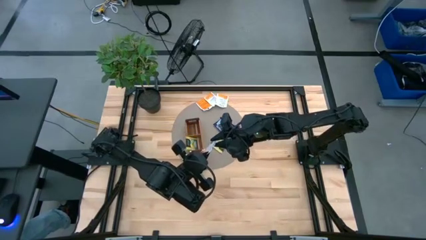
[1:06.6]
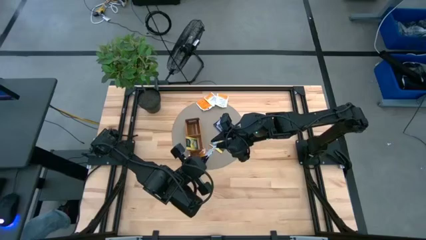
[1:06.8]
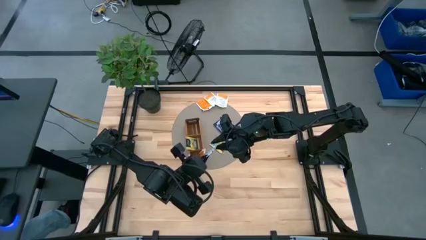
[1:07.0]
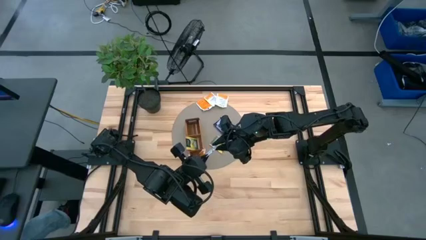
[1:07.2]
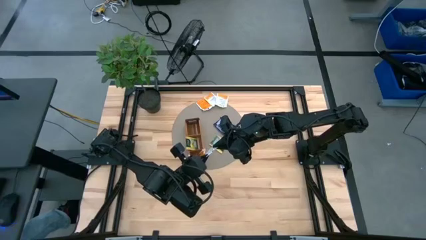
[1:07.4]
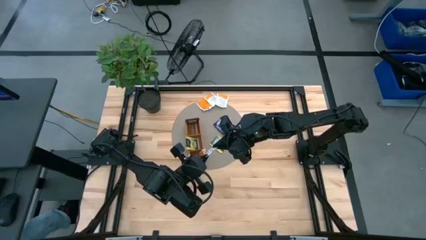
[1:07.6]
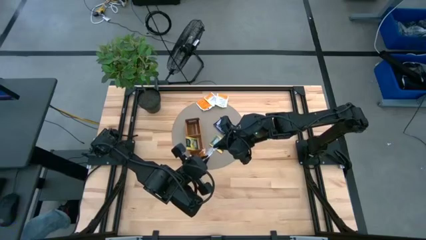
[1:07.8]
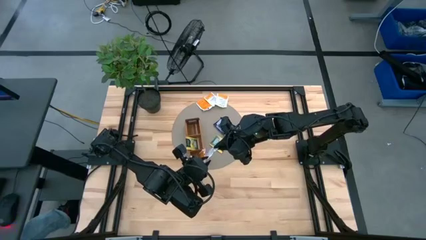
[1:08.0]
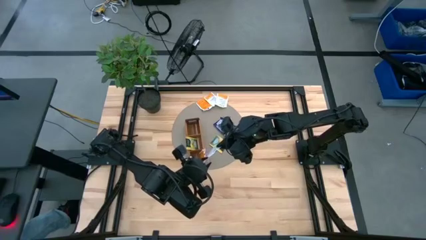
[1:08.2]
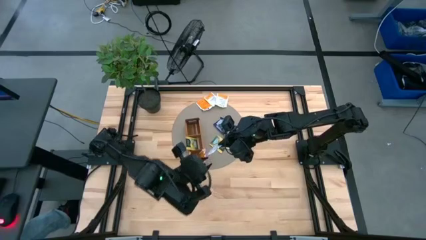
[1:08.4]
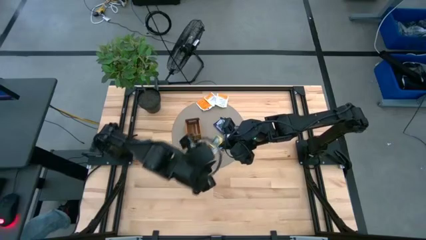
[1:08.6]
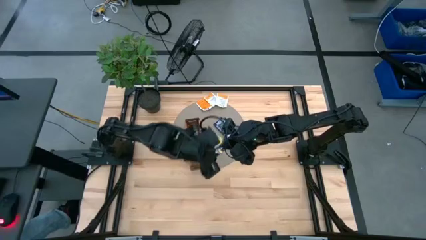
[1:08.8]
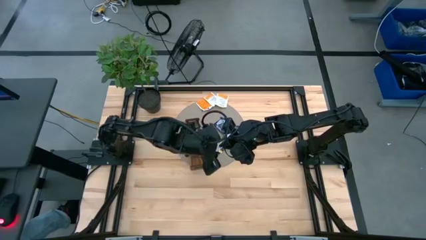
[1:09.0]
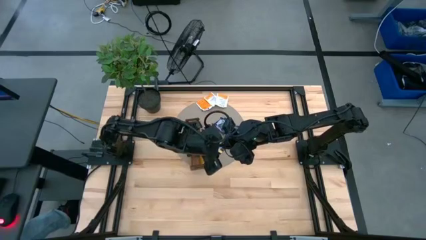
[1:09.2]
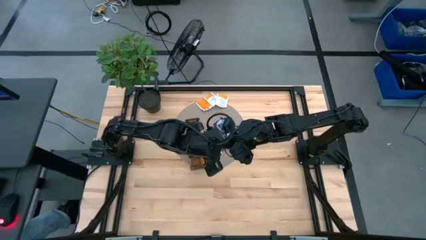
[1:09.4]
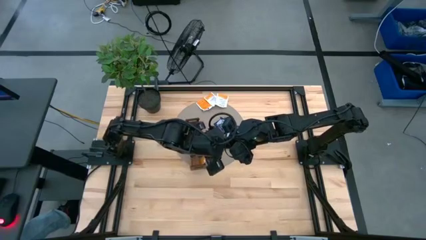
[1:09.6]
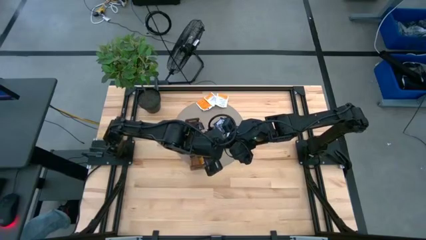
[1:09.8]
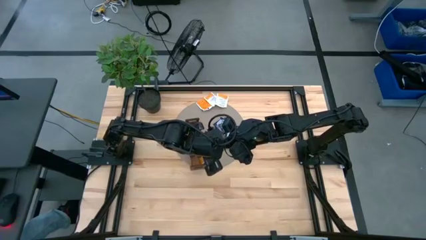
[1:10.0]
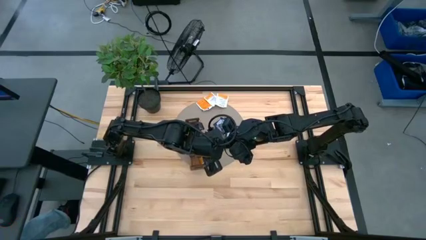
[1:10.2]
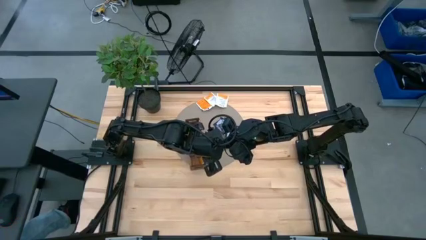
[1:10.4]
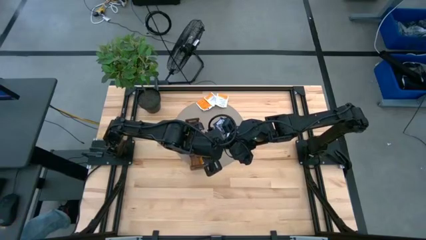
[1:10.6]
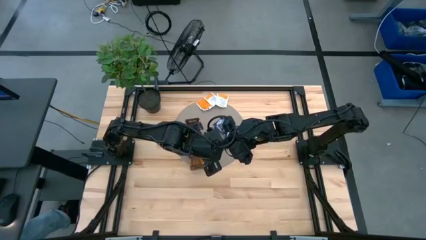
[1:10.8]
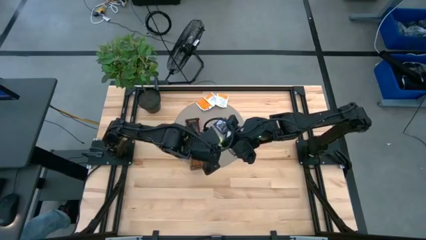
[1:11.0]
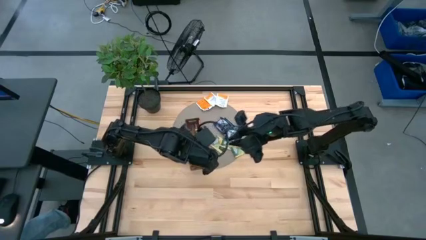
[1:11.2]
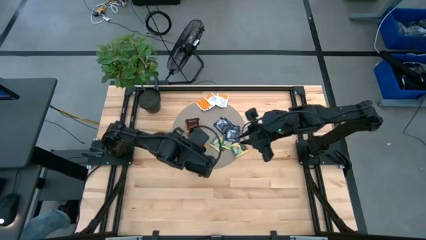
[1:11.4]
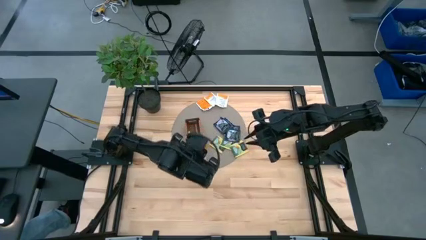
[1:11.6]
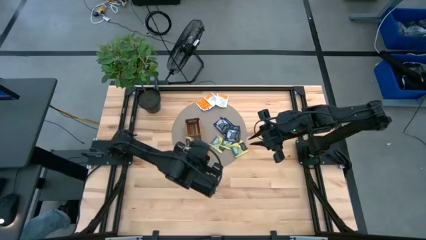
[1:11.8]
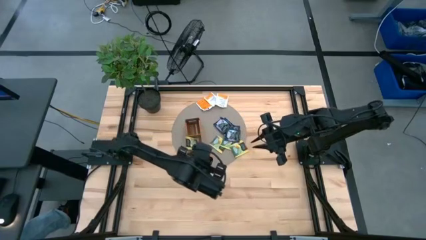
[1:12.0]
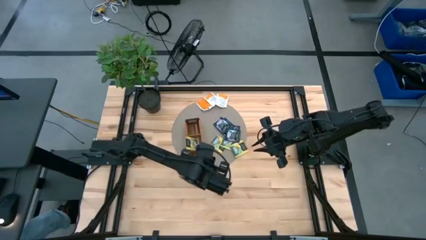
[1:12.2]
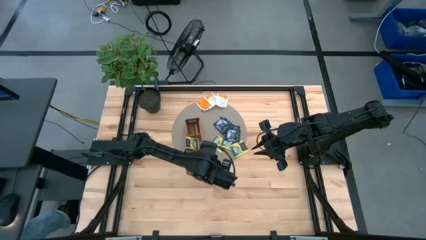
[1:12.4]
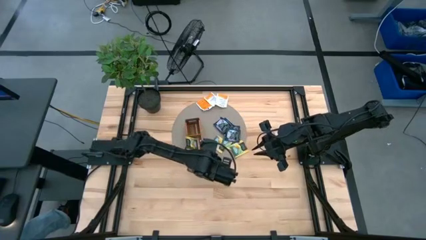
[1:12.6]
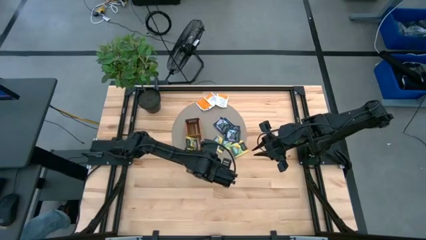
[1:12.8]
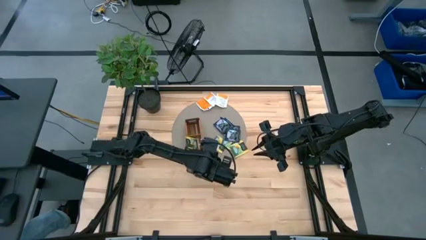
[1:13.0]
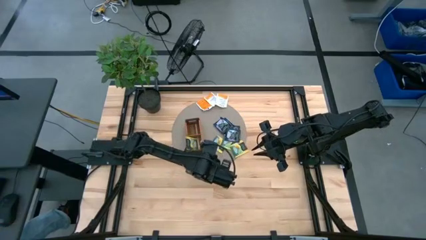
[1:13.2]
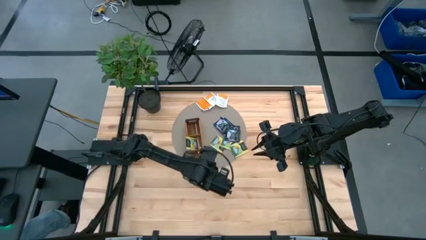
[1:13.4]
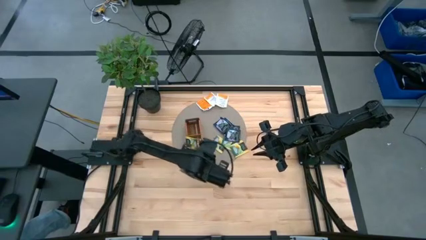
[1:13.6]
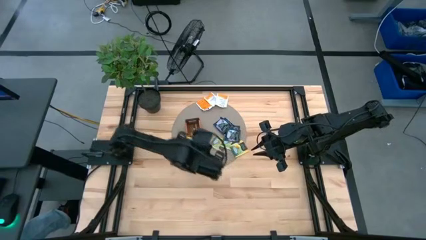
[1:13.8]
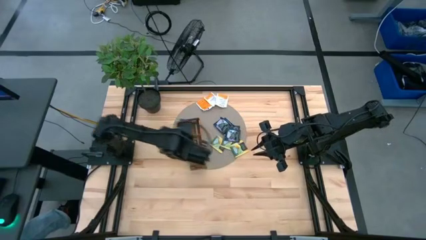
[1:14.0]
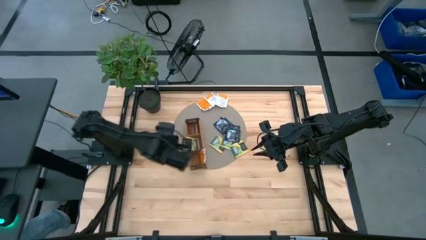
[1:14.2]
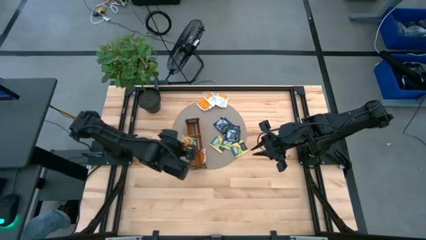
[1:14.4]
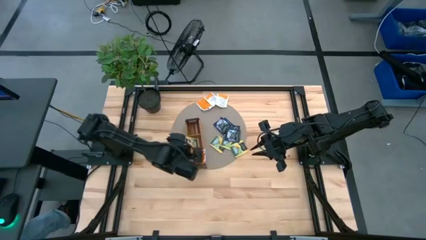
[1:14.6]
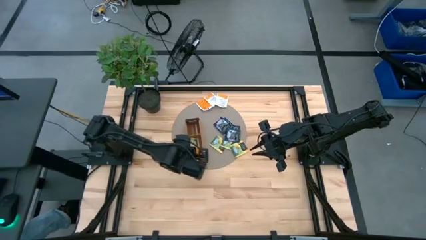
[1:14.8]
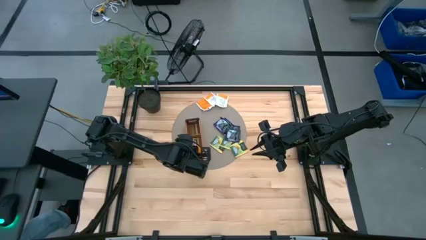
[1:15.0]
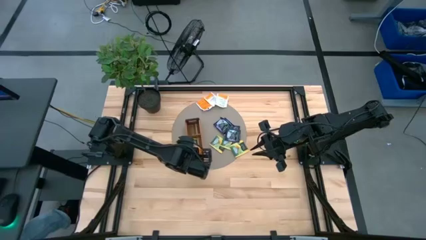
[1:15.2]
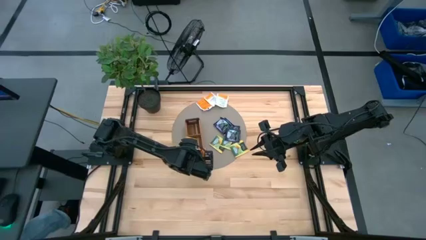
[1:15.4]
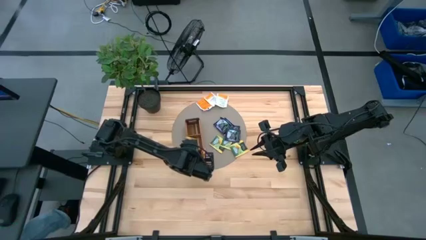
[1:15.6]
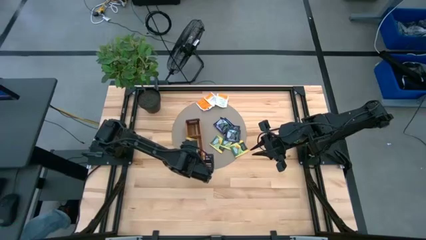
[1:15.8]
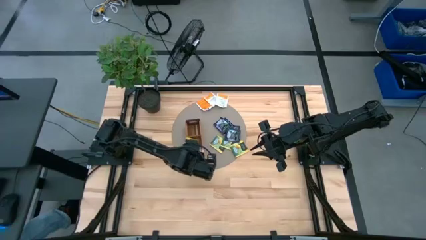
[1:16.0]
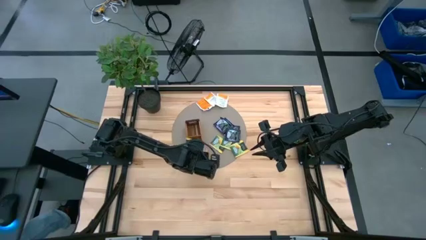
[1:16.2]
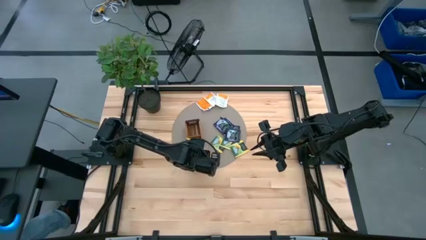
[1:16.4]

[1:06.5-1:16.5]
Task: Pick & Place Tea
Put the white tea bag into the bottom section of the wooden organizer

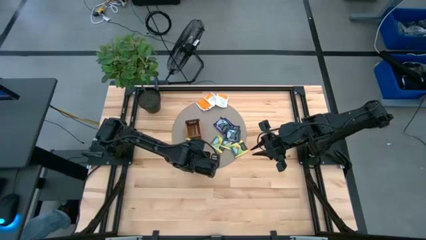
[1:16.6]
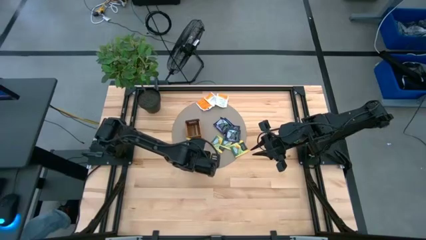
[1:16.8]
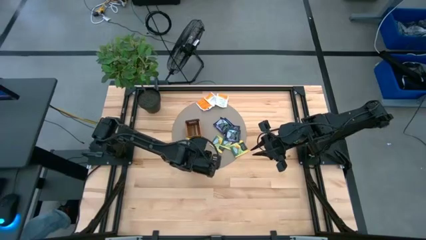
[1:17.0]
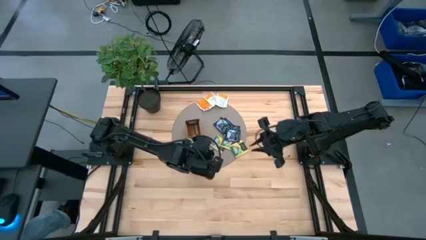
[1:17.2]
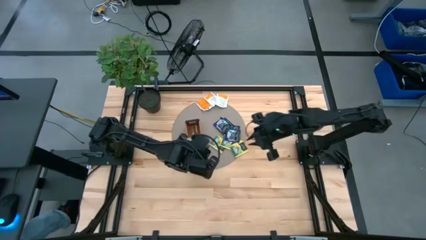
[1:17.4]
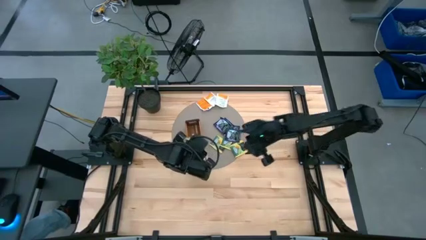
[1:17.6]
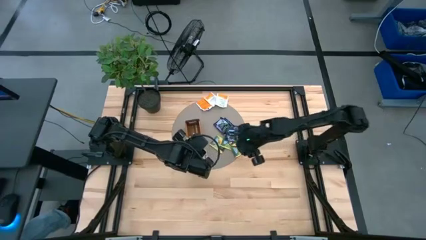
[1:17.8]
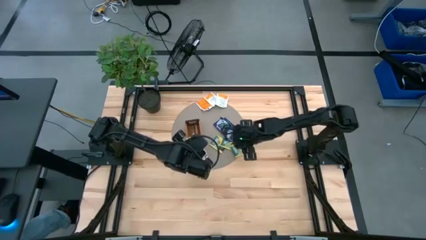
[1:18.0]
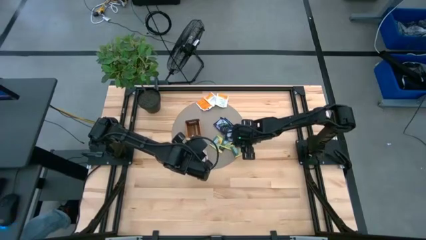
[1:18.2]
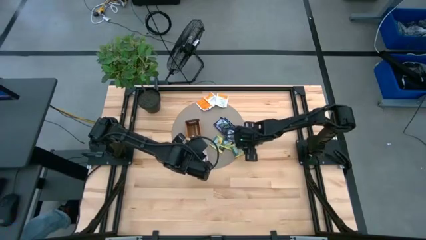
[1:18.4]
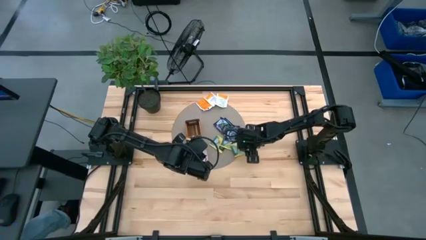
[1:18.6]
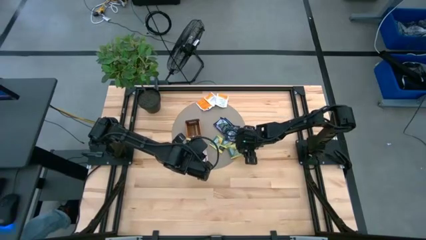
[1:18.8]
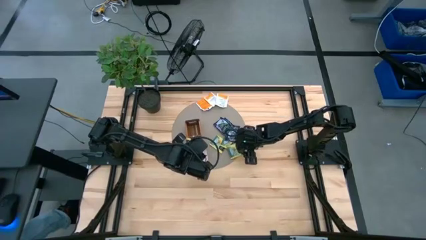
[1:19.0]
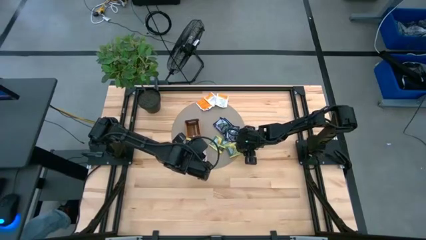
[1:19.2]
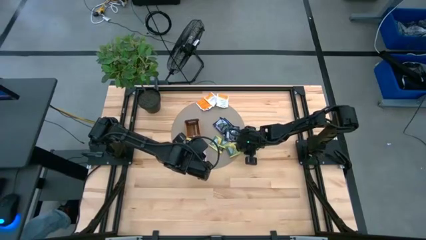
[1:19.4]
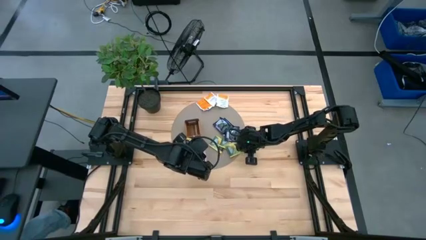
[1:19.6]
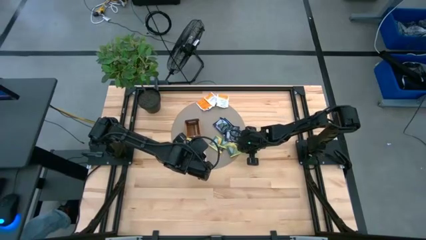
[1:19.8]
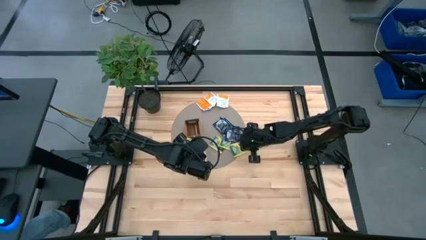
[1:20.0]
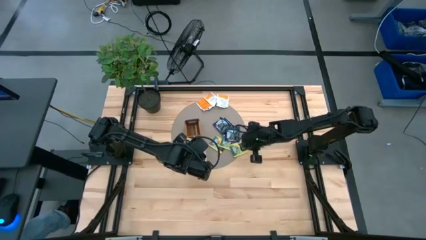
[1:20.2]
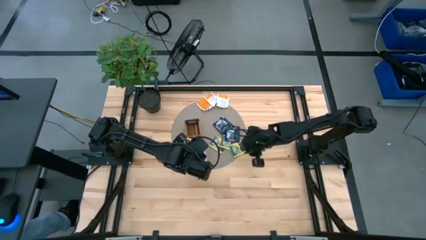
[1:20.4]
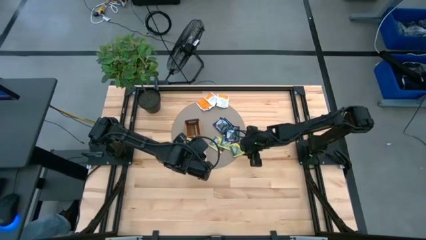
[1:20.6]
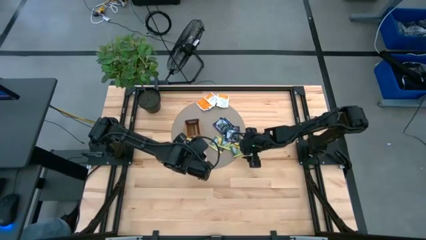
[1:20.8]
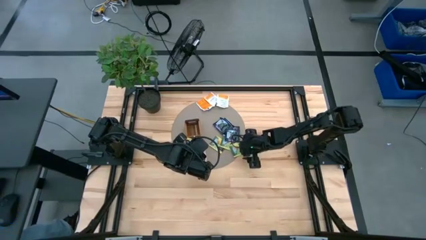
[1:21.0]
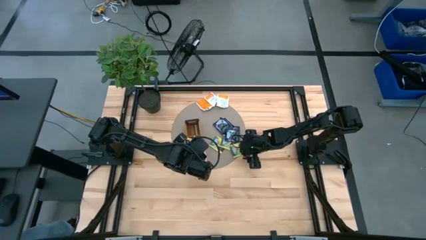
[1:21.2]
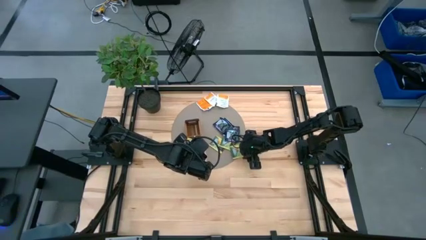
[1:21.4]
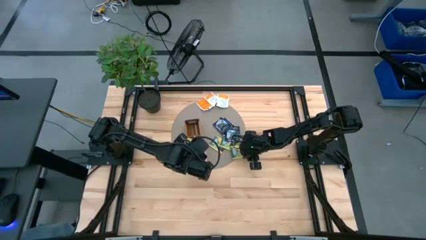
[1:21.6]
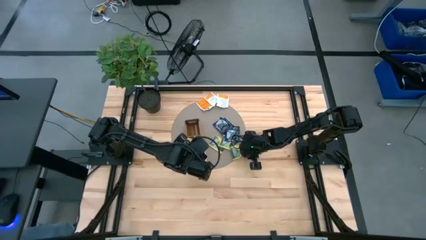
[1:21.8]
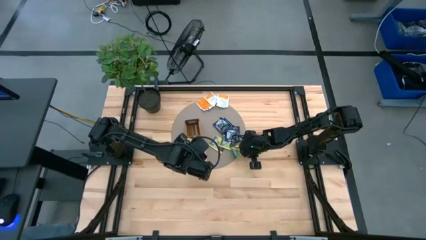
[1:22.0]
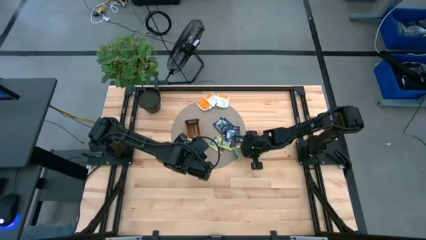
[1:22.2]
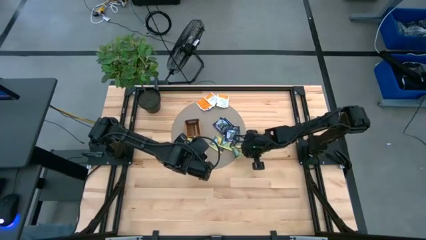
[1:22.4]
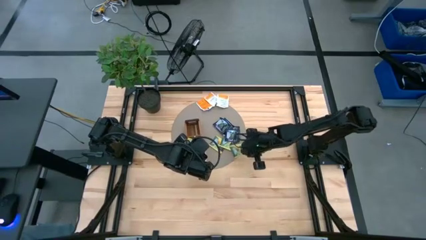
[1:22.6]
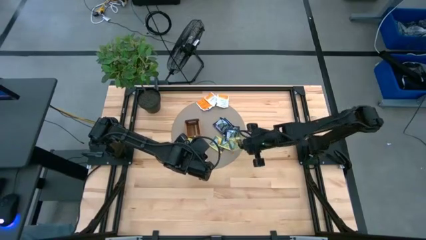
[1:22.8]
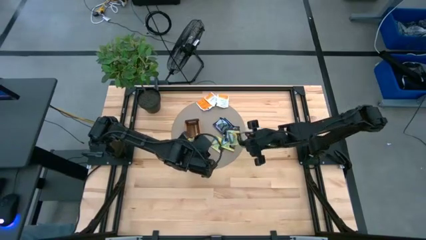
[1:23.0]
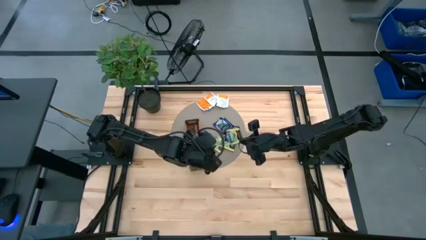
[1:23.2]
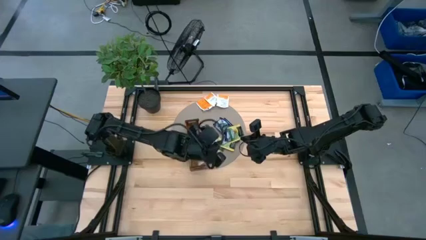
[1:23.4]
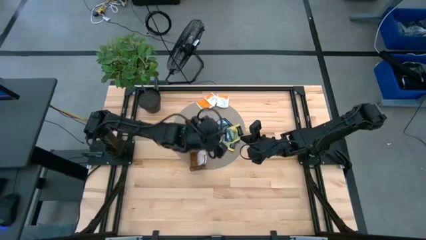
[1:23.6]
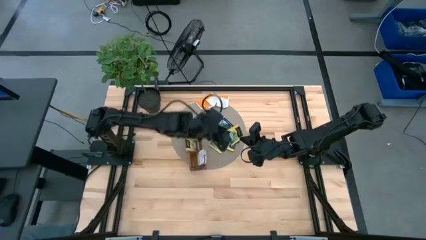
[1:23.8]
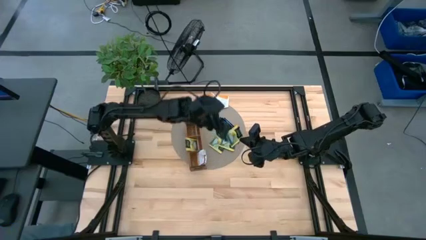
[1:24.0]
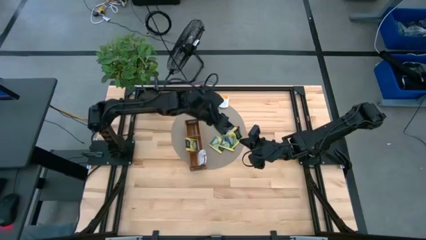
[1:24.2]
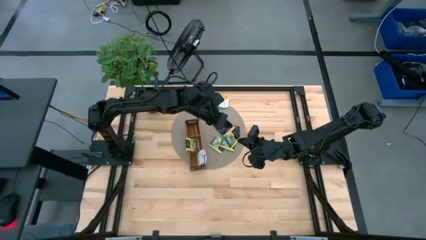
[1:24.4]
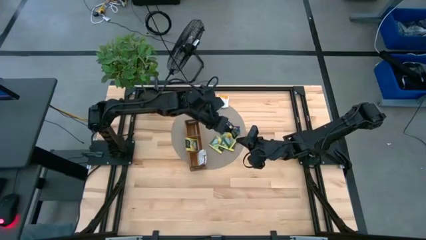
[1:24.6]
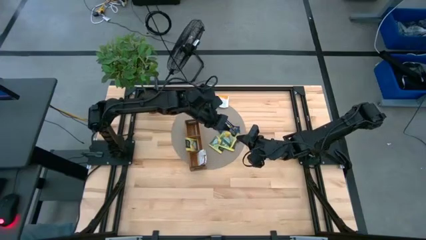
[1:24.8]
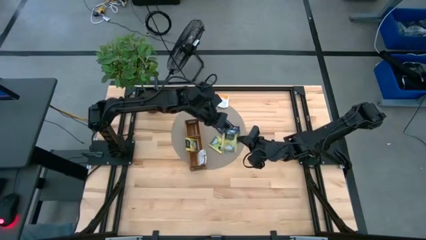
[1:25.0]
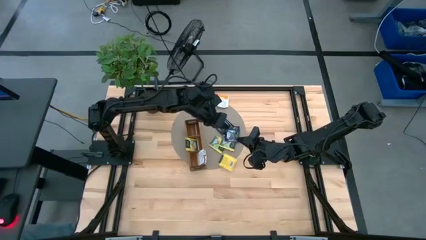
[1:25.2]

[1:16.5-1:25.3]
Put the yellow tea bag into the middle section of the wooden organizer
